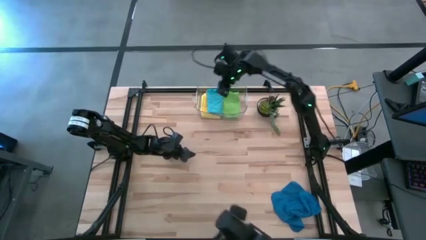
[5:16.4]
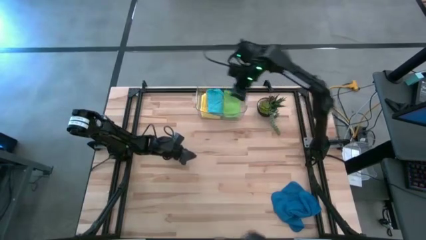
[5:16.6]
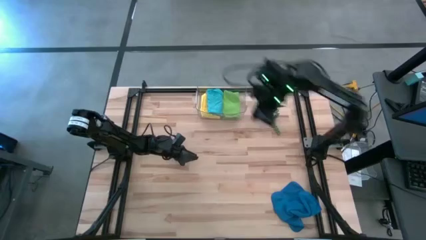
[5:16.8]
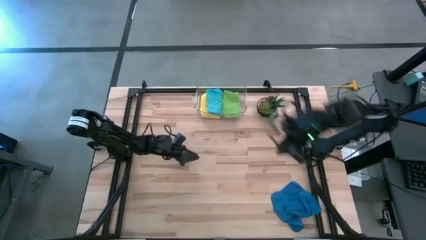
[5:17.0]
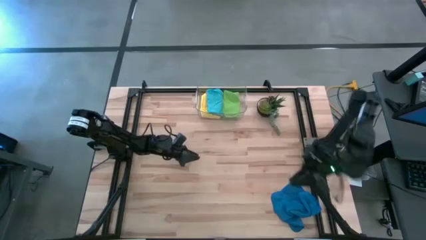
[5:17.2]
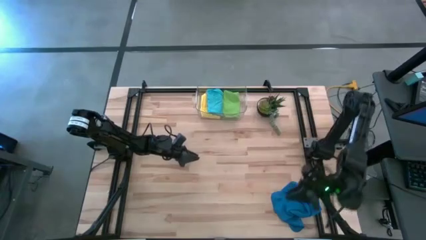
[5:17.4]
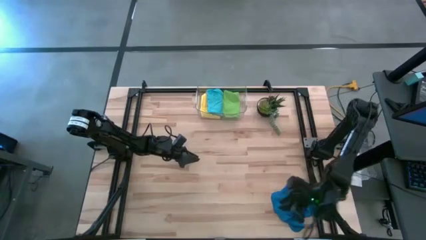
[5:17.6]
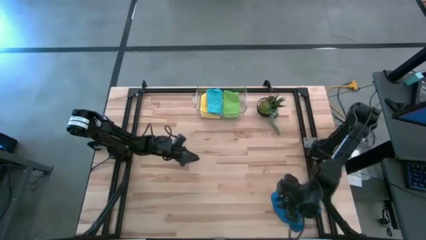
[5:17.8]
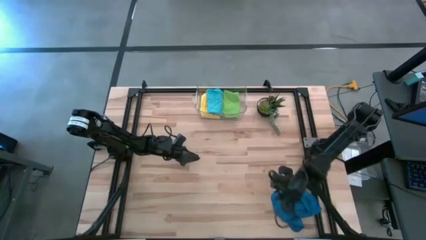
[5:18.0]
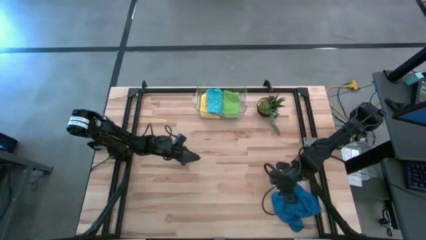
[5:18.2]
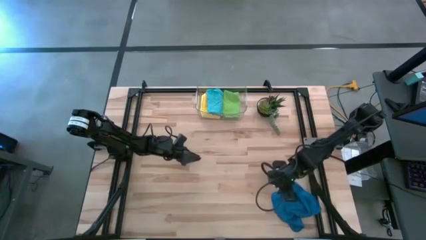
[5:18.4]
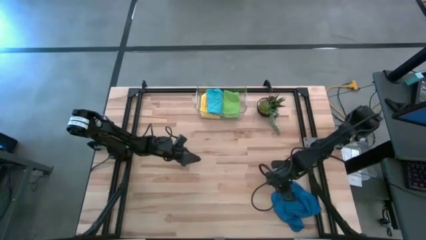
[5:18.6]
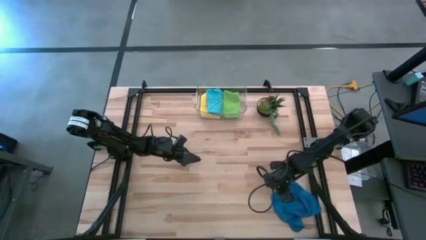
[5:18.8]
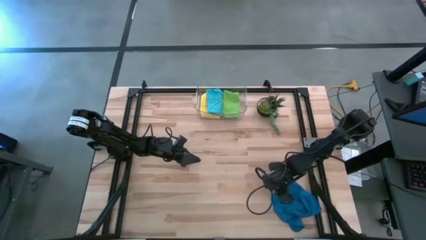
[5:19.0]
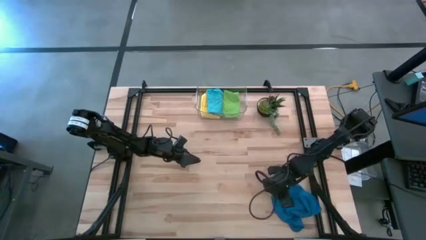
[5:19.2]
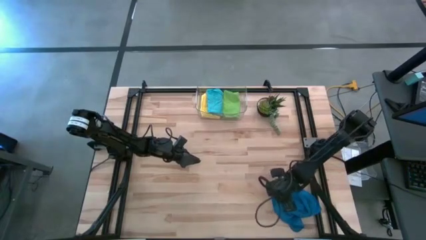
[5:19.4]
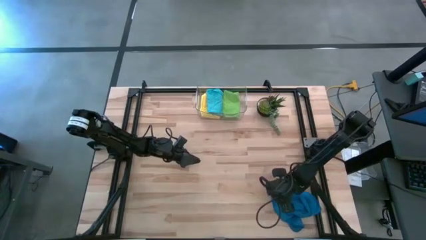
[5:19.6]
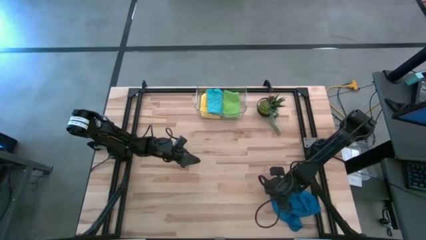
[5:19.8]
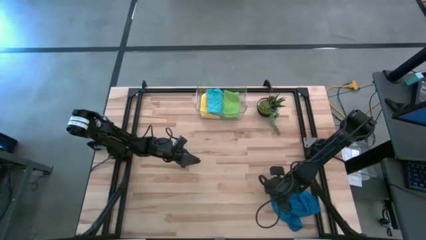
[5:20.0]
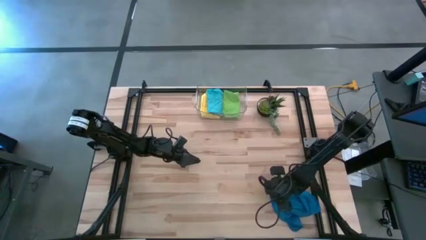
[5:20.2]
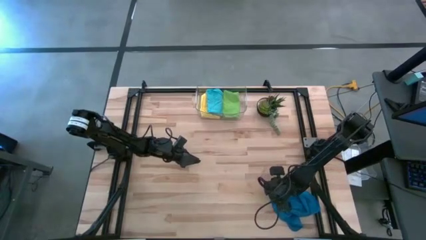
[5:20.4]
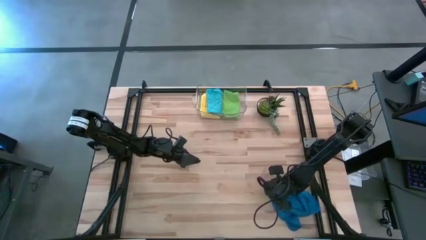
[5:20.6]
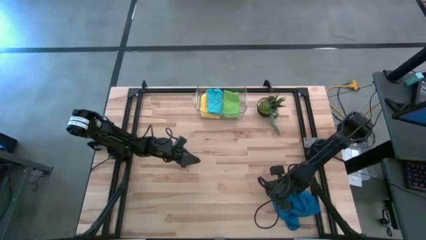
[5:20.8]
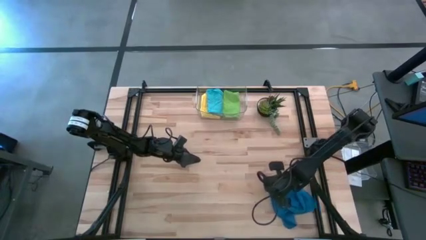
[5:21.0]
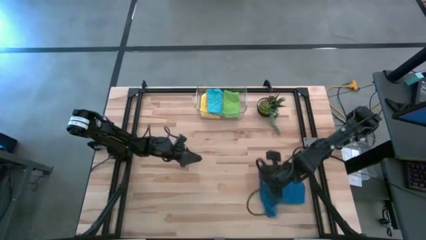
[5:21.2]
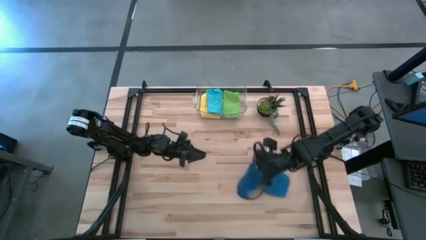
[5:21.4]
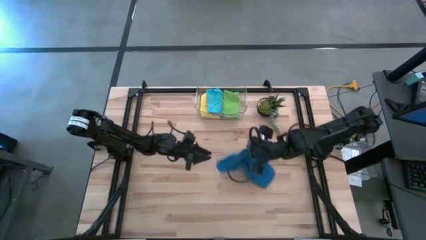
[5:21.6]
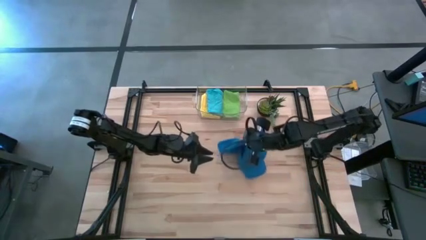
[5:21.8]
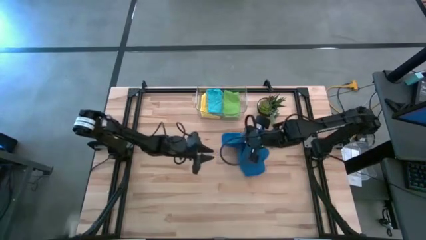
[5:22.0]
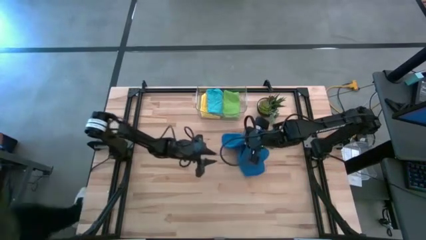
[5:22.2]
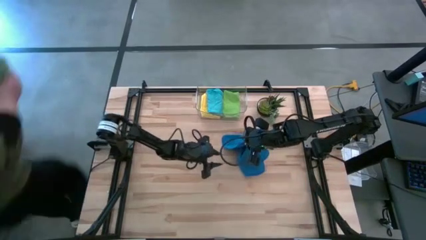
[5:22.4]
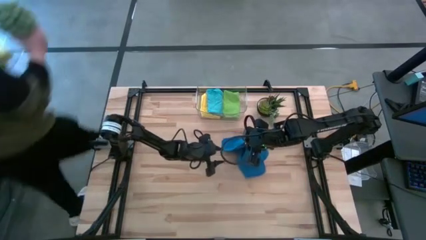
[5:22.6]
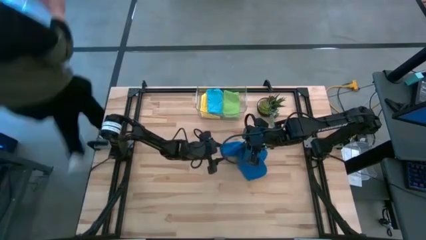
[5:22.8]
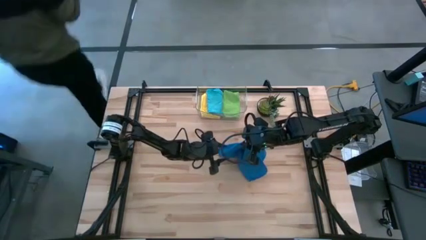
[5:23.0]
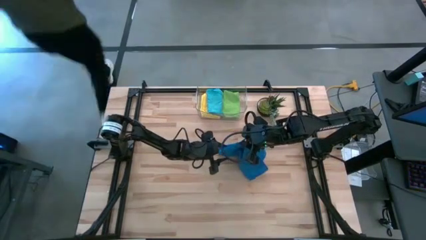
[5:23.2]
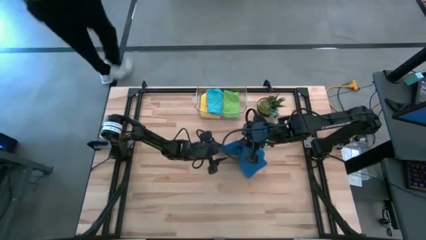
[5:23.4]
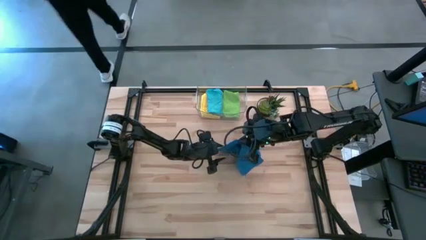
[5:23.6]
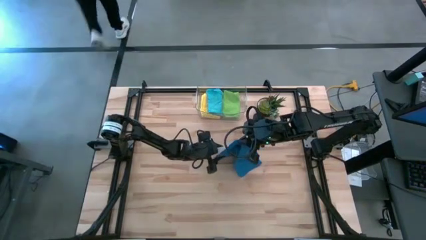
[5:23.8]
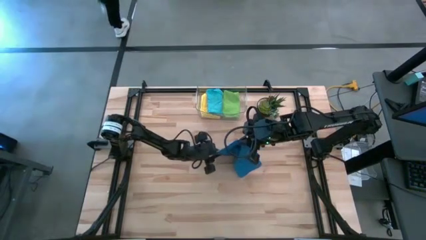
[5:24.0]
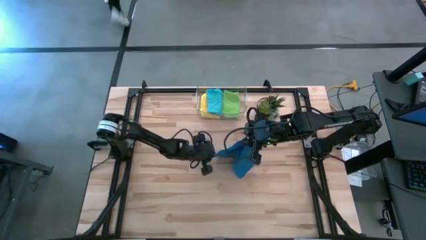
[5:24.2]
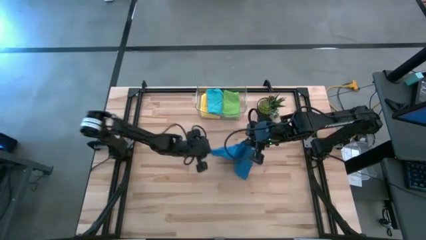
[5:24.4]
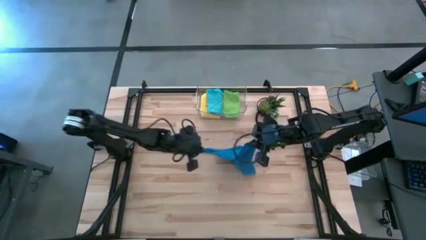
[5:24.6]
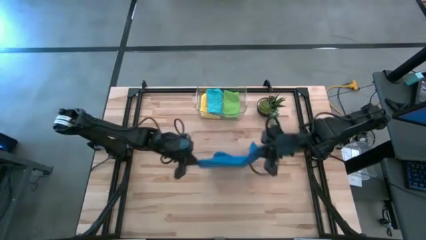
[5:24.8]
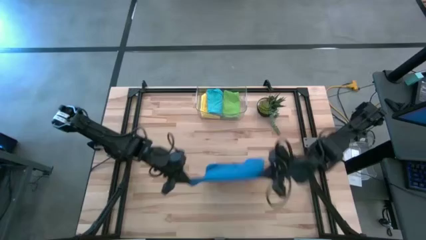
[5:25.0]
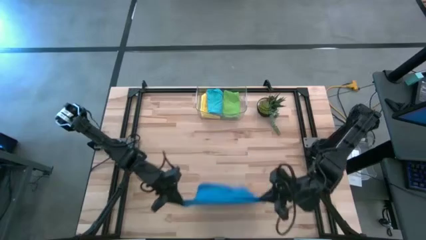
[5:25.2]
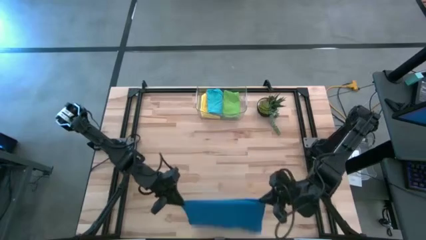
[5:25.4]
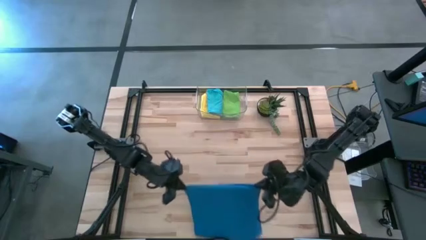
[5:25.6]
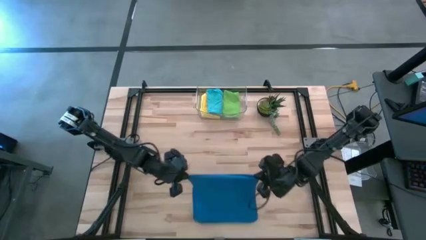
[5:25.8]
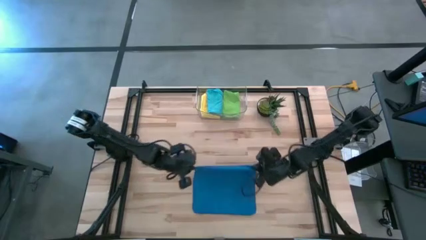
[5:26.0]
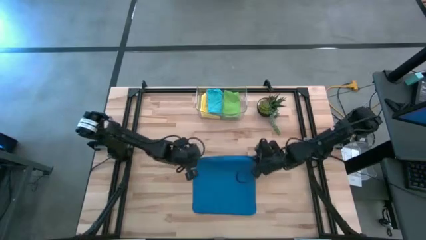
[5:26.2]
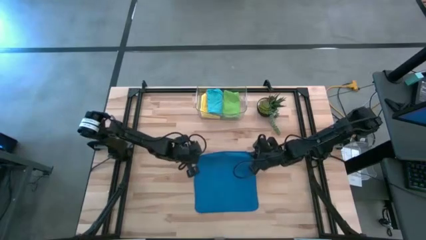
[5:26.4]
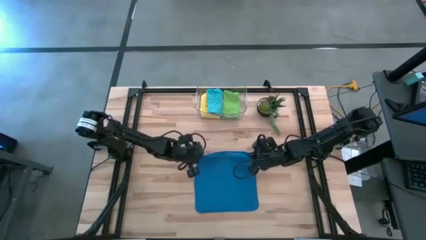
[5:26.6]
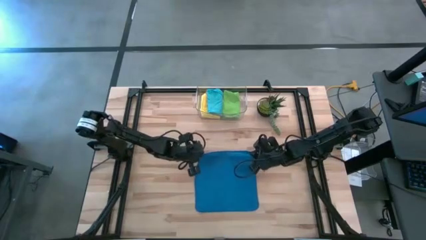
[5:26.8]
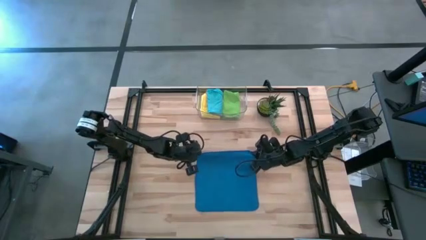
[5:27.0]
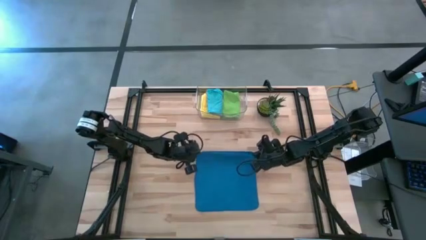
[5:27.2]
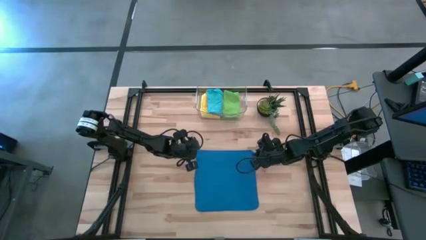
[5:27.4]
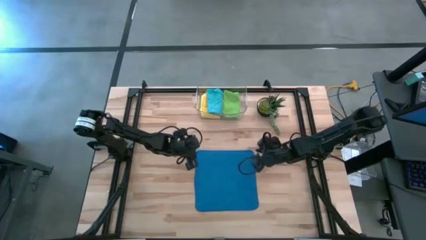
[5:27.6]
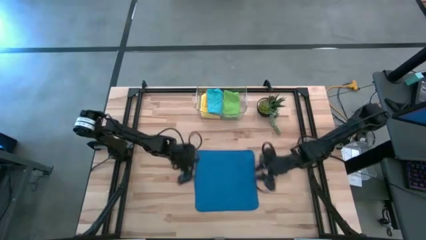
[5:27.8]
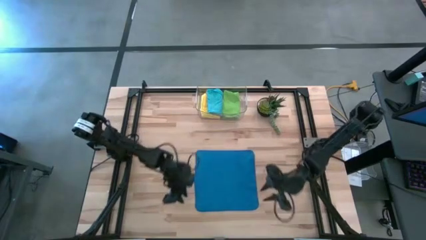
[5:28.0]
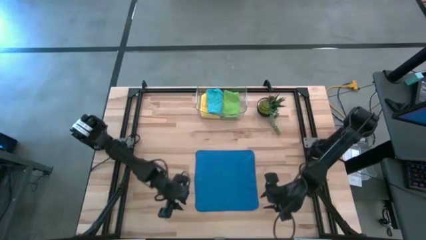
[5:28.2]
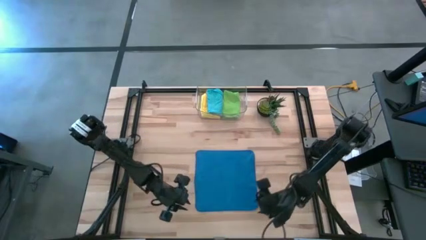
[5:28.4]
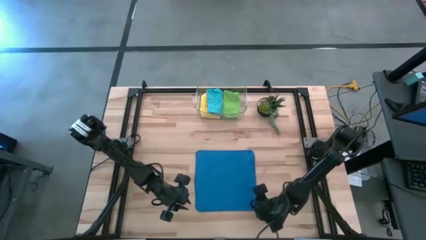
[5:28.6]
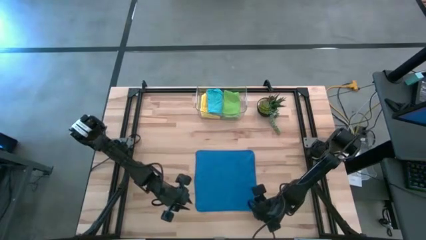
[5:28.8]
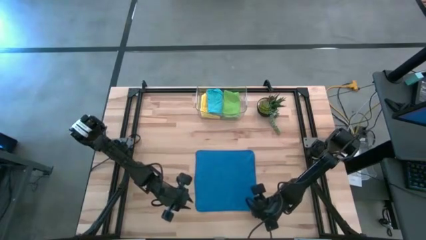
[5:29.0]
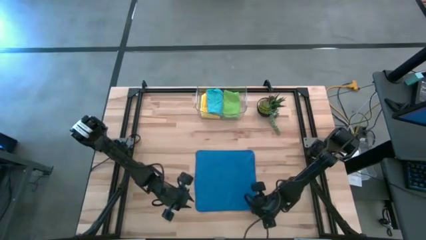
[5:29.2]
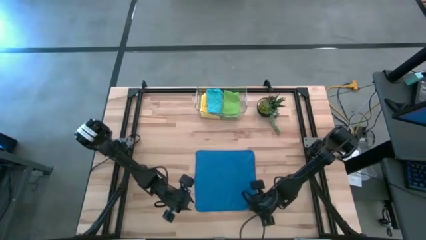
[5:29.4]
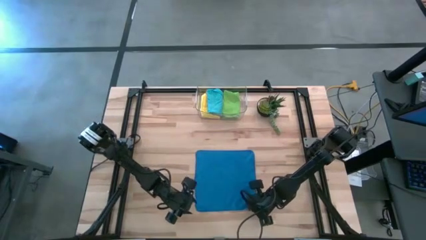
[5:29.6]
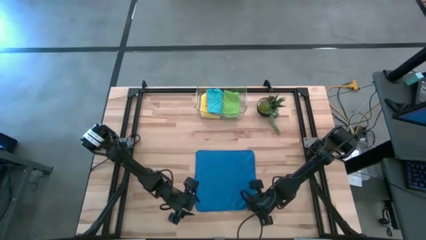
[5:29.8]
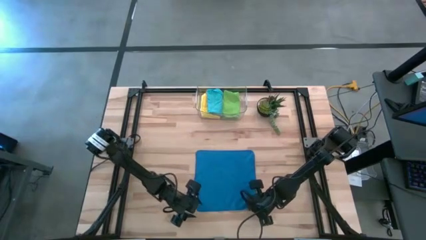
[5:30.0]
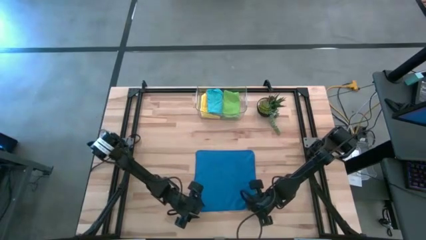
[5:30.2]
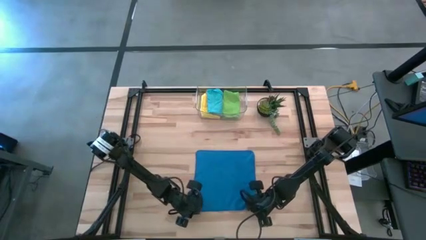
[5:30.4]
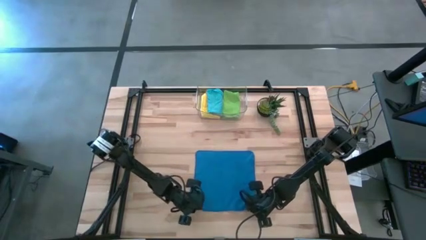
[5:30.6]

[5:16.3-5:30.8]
Task: Fold microfiber towels
Fold the dark blue microfiber towel

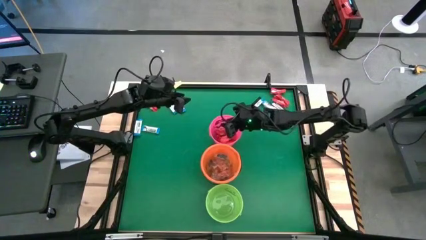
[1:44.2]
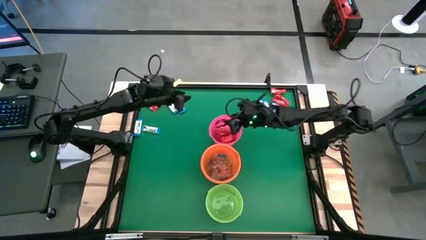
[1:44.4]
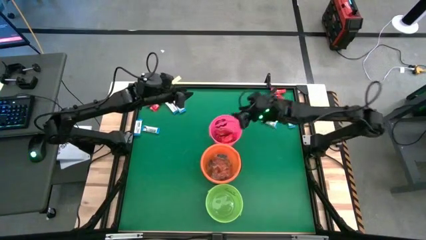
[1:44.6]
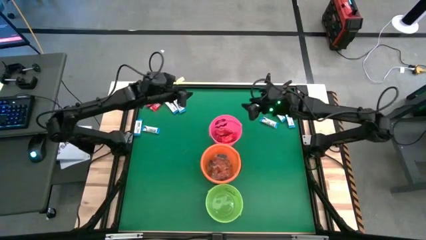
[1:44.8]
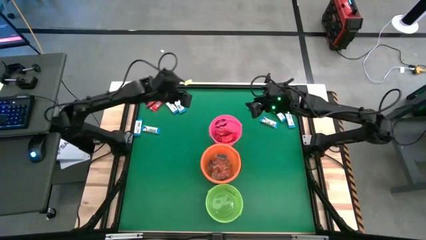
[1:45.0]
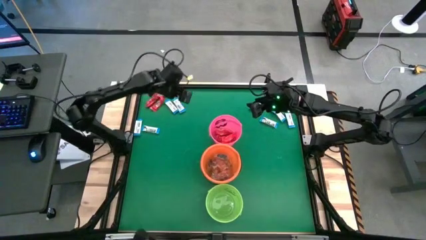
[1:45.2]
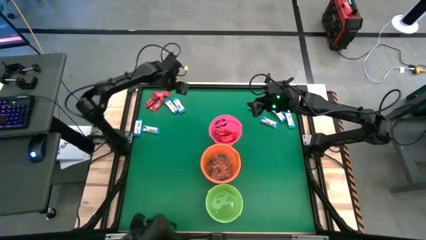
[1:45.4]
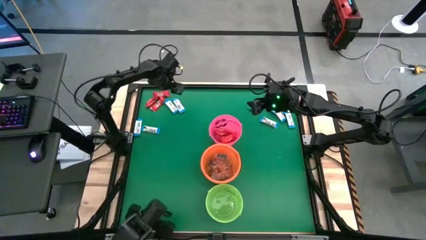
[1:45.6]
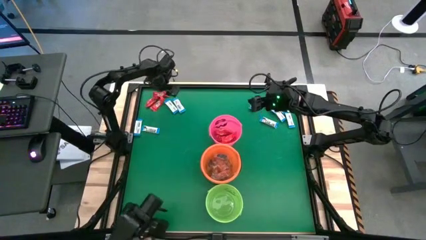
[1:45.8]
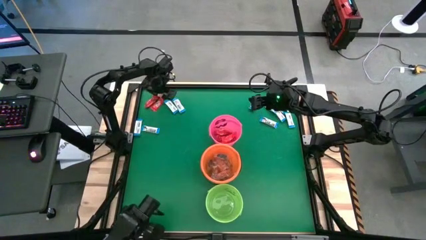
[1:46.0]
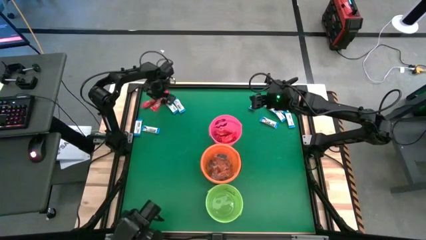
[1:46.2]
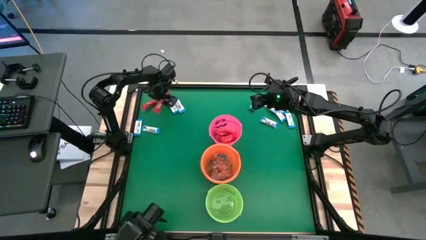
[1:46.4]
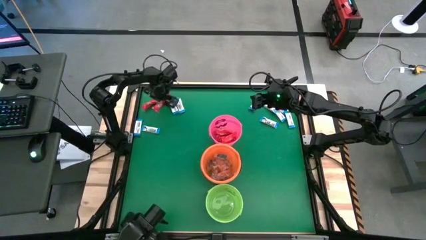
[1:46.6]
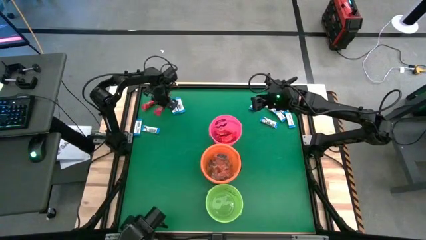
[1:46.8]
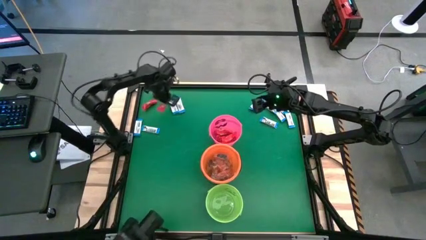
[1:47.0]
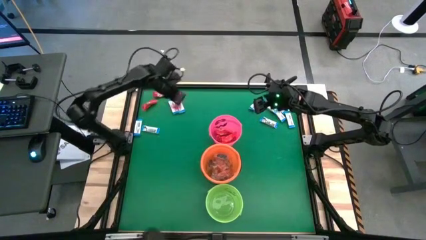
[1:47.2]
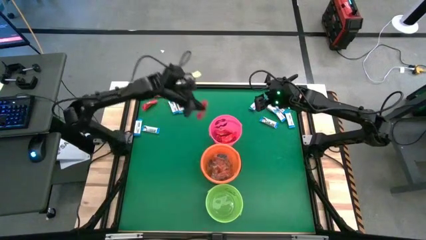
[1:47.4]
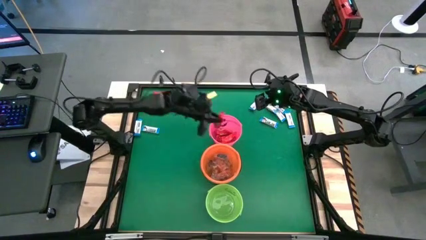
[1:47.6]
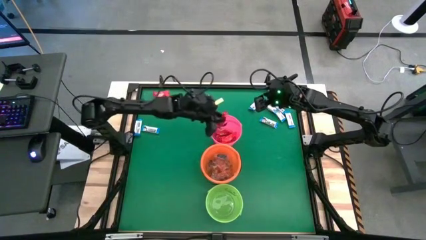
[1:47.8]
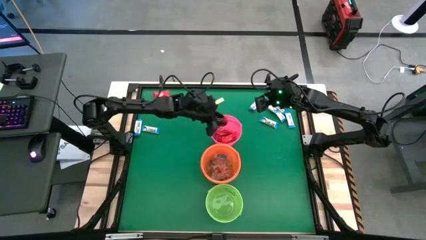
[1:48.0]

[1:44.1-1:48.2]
Task: Sort candy by brand, put in halloween buckets
Put the red chocolate into the pink bucket
